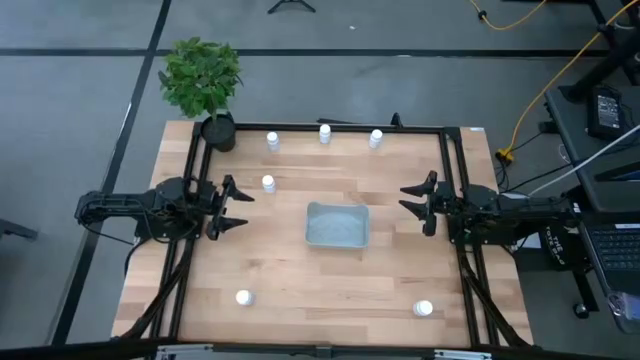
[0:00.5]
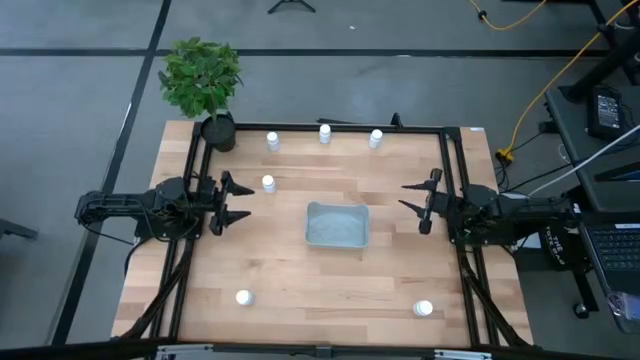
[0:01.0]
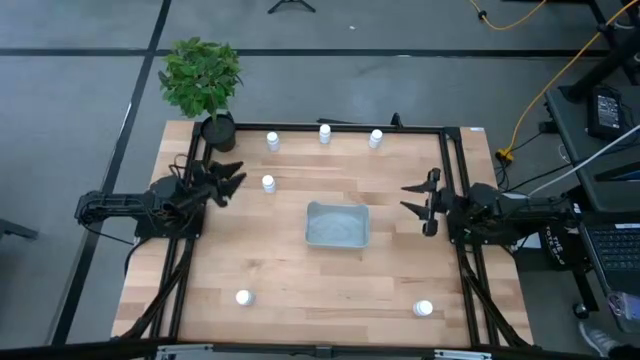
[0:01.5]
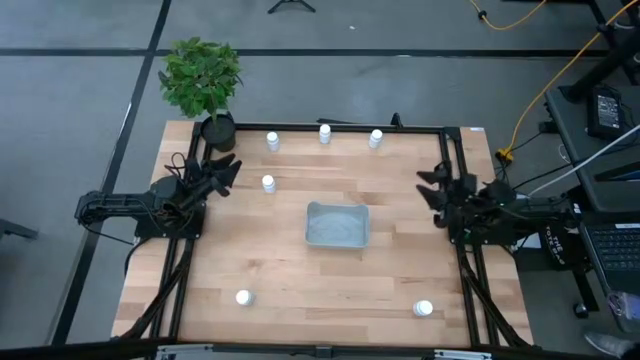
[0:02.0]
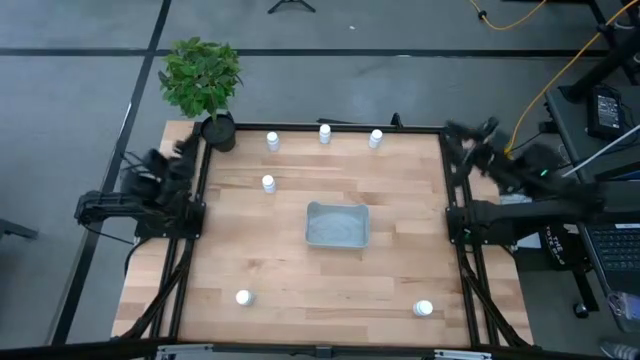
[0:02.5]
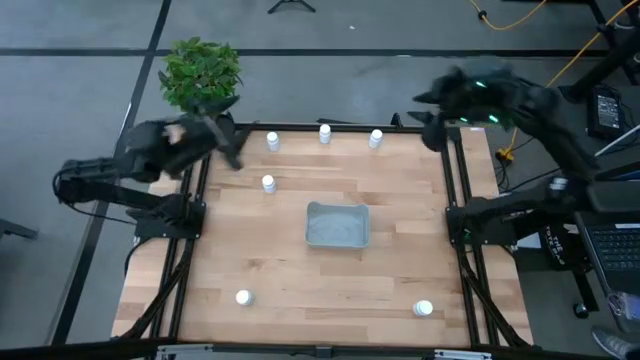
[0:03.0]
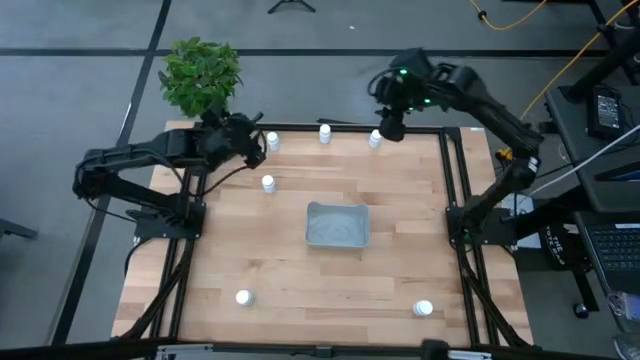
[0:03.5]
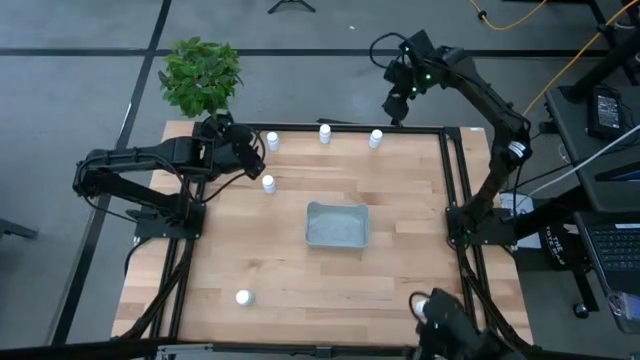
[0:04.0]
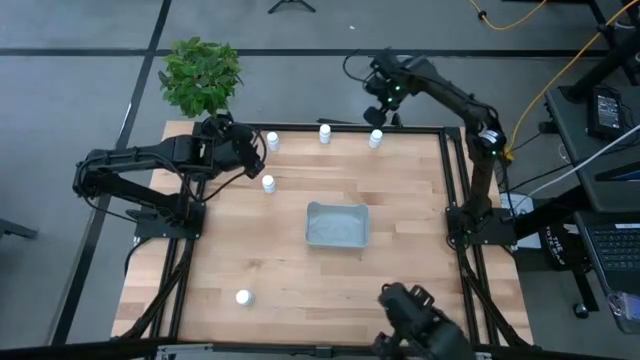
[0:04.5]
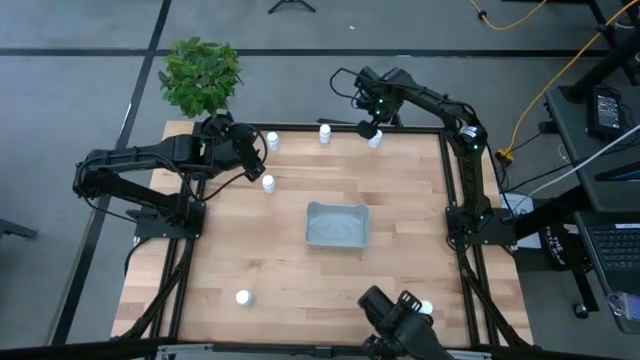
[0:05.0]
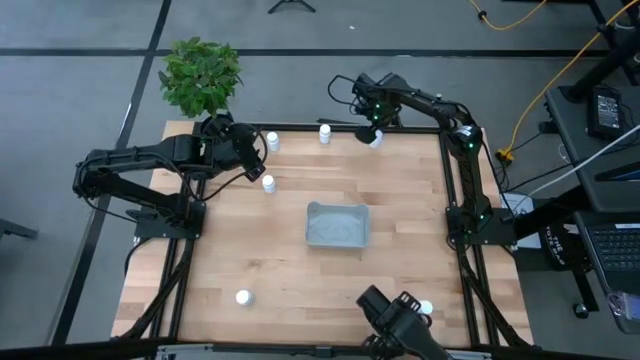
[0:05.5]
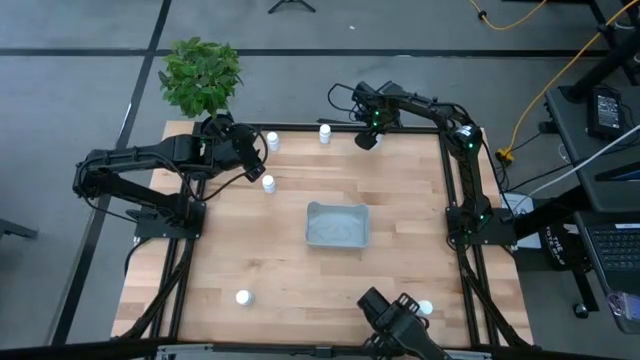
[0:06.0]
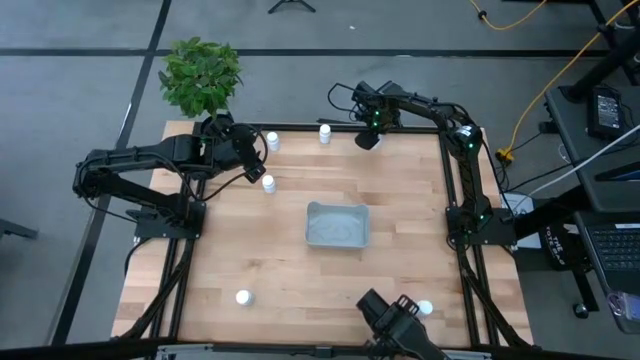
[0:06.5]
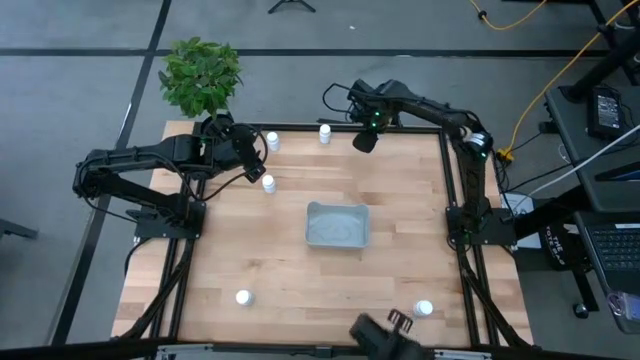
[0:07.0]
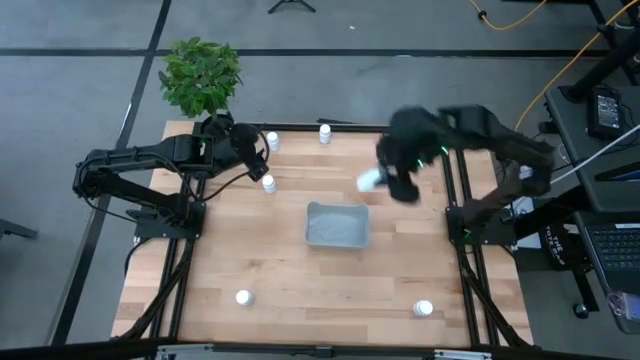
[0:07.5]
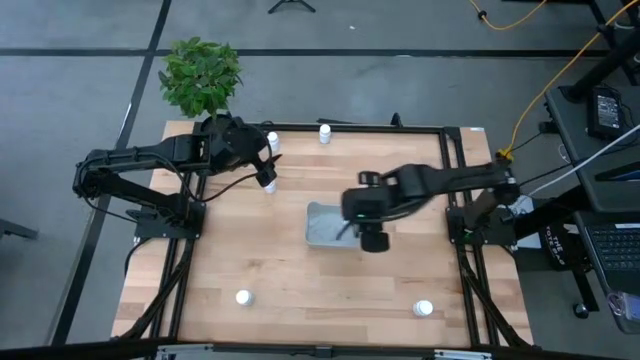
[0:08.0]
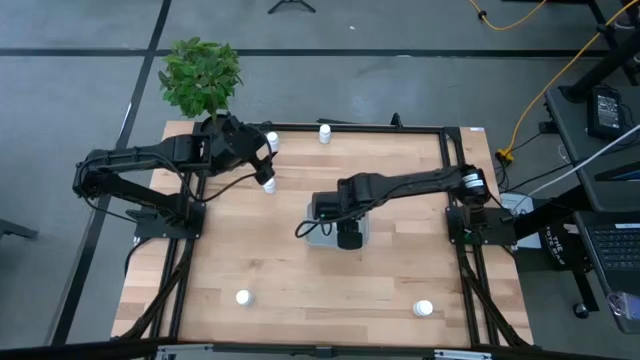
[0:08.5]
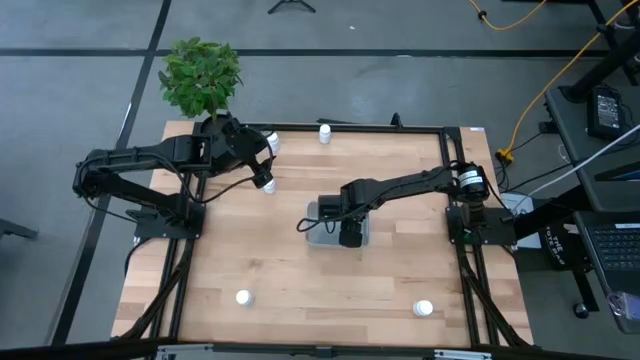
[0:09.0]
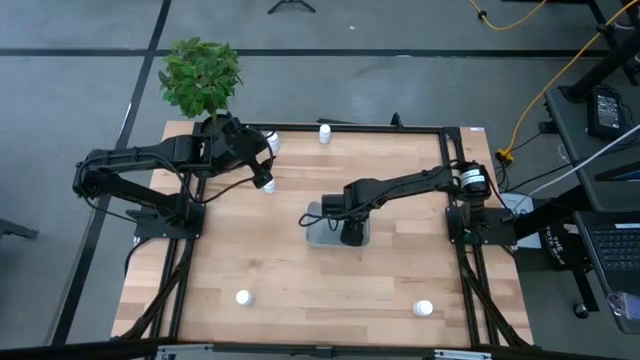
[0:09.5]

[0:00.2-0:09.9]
Task: Pick and place pill bottles into a basket
Put the white pill bottle into the gray bin

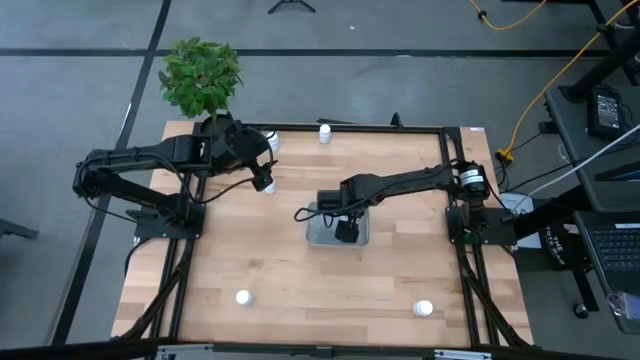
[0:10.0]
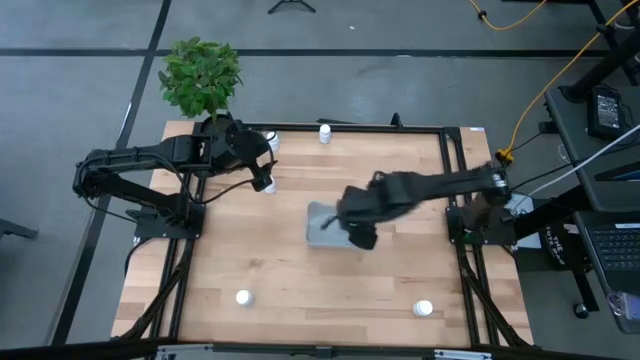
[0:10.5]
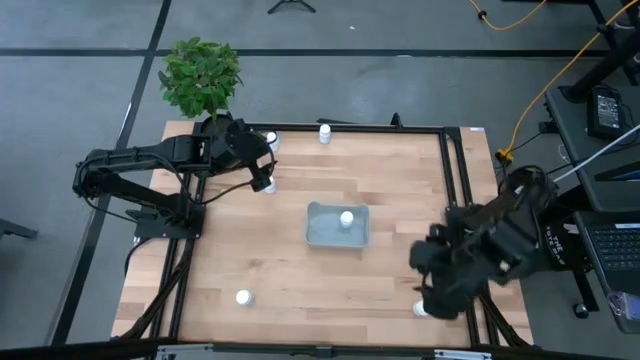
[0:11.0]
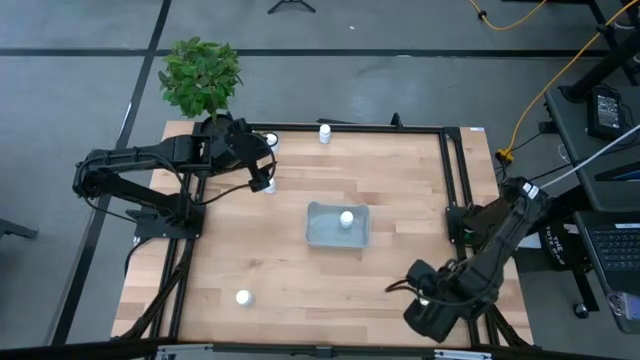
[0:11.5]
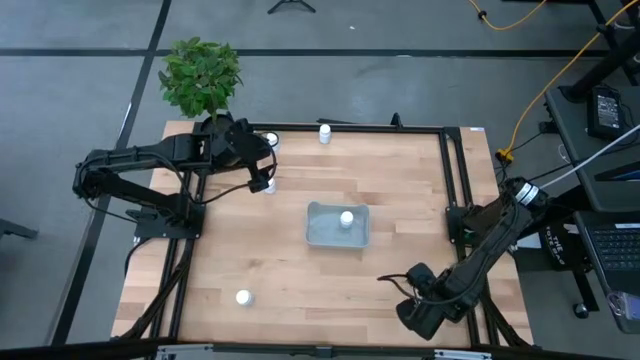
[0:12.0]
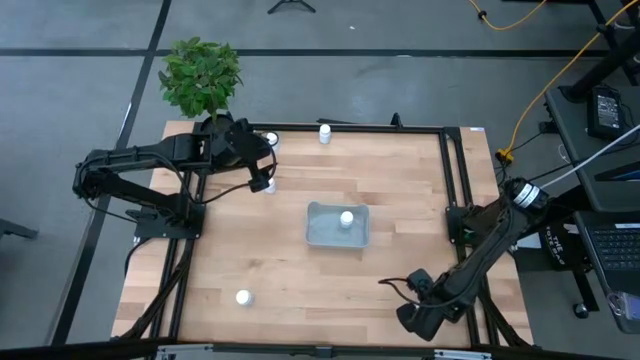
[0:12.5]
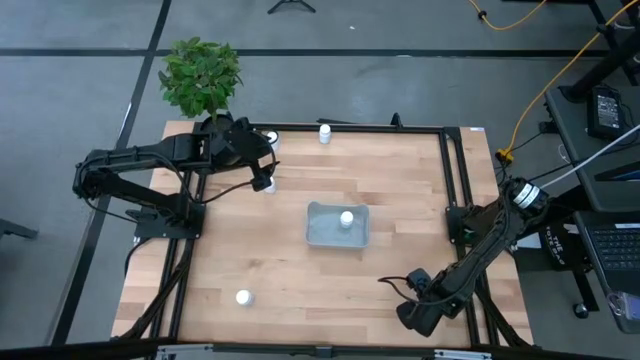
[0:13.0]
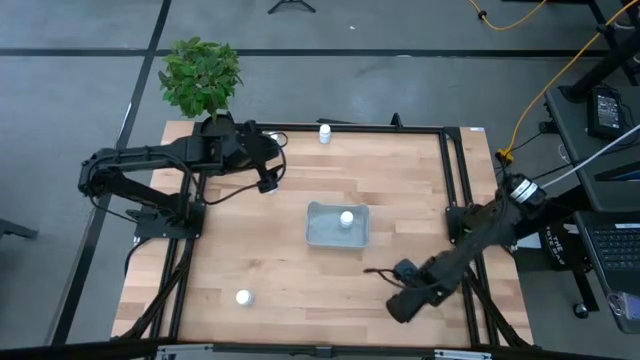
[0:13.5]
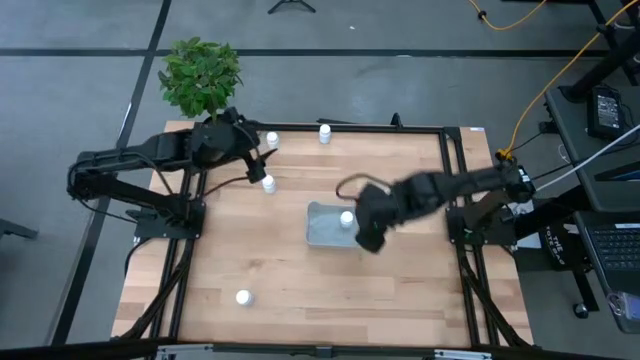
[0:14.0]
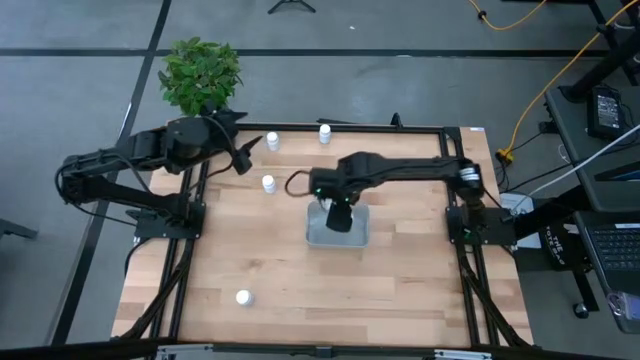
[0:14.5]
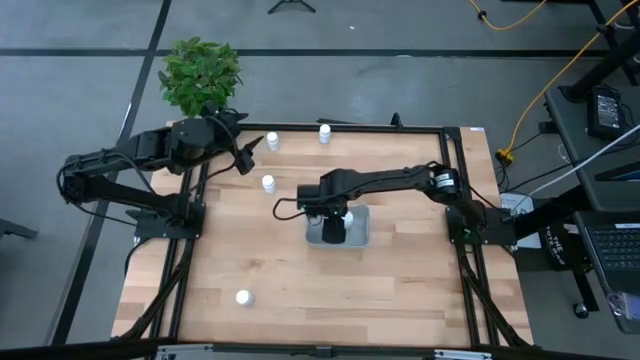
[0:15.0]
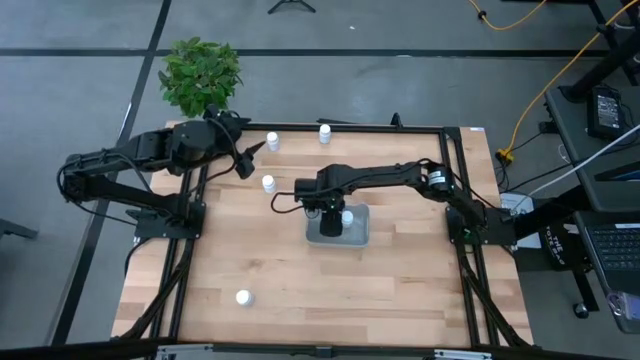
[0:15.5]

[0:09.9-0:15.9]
Put the white pill bottle into the gray bin

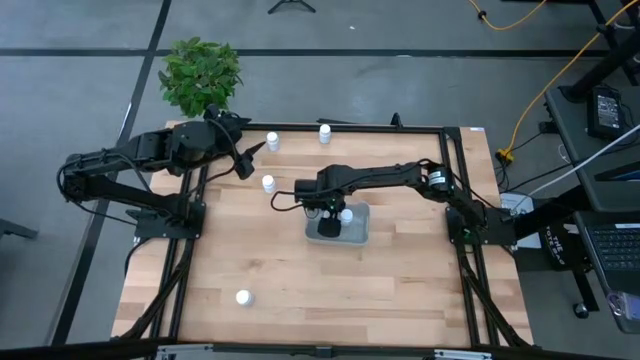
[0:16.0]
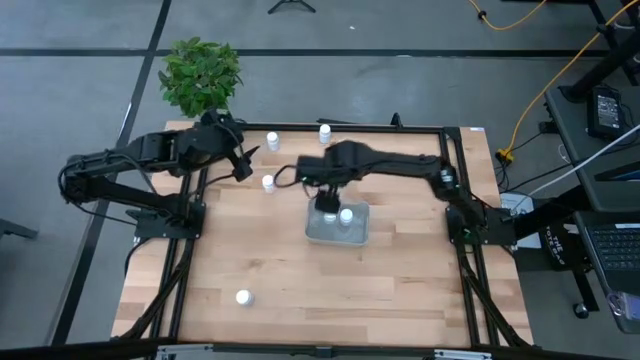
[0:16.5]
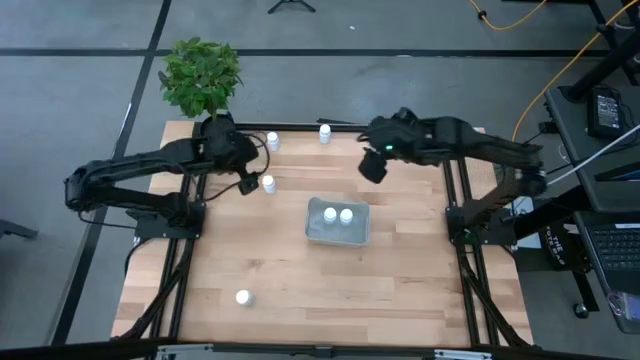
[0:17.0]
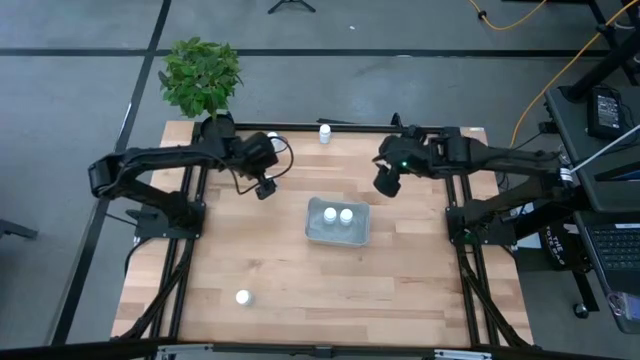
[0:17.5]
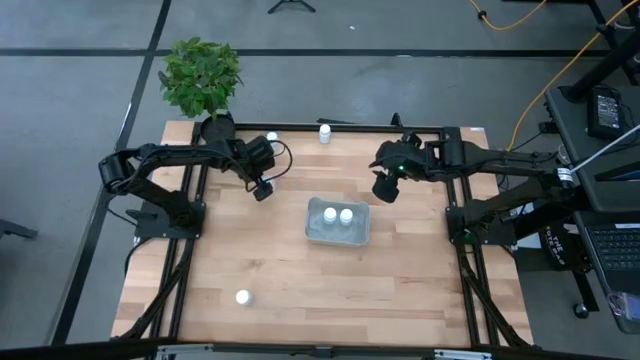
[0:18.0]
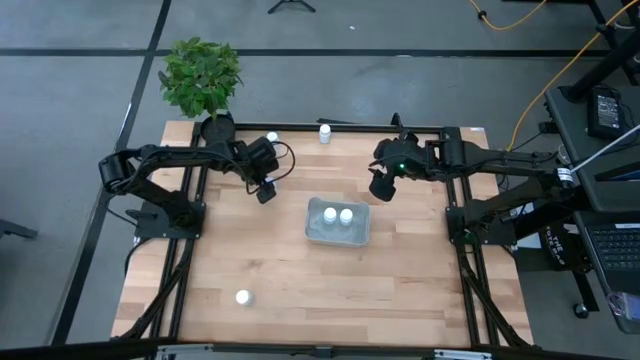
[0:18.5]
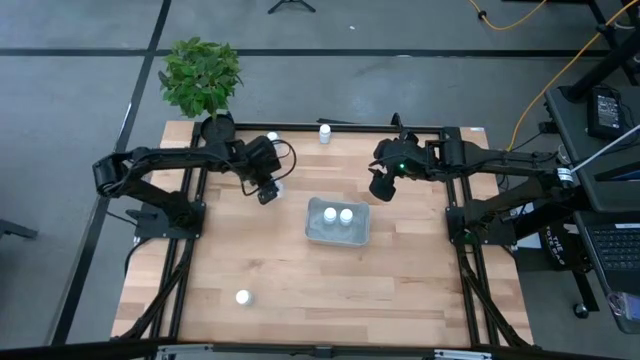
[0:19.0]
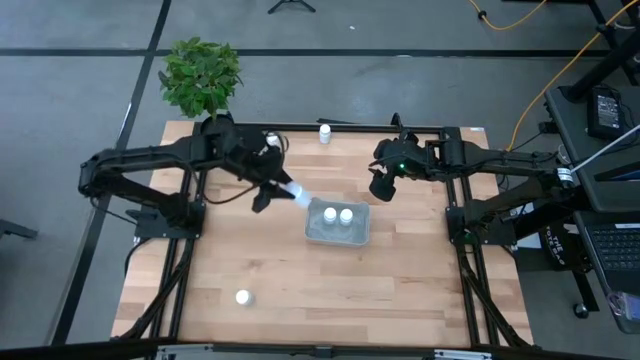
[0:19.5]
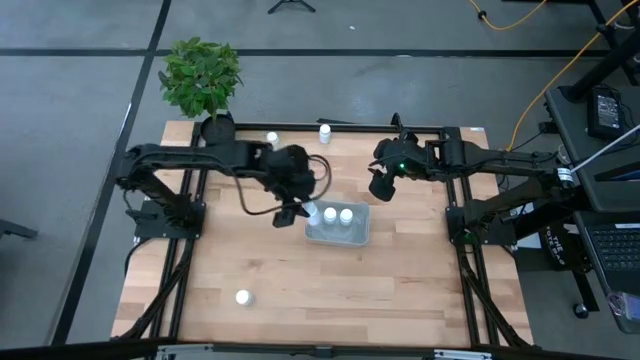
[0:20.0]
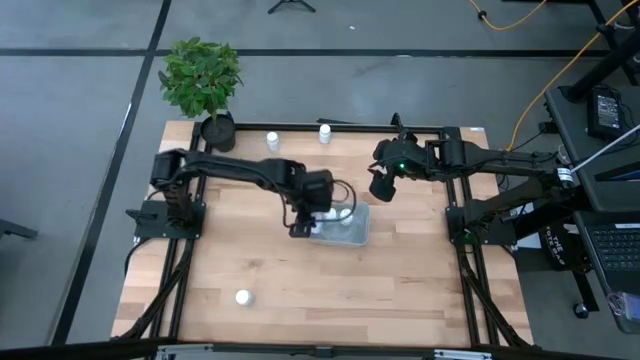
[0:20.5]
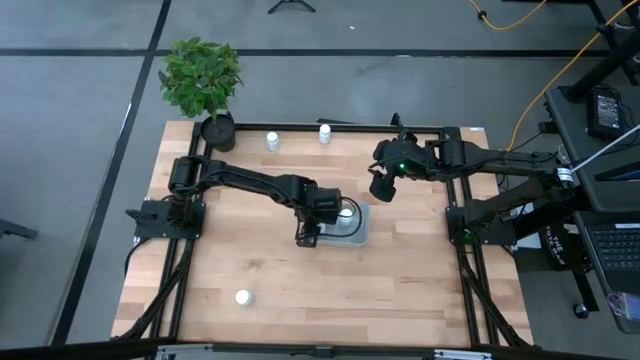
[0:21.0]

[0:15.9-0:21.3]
Put the white pill bottle into the gray bin

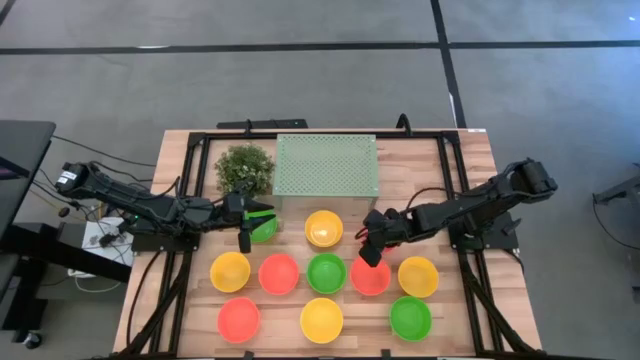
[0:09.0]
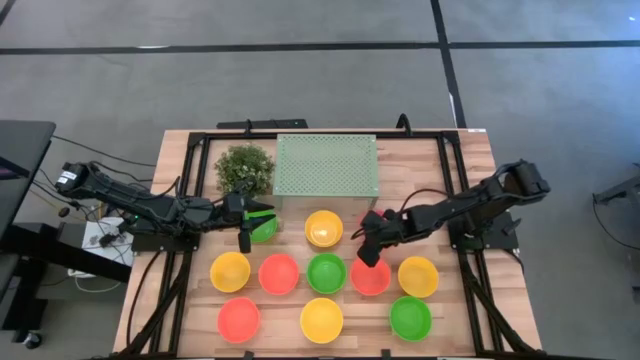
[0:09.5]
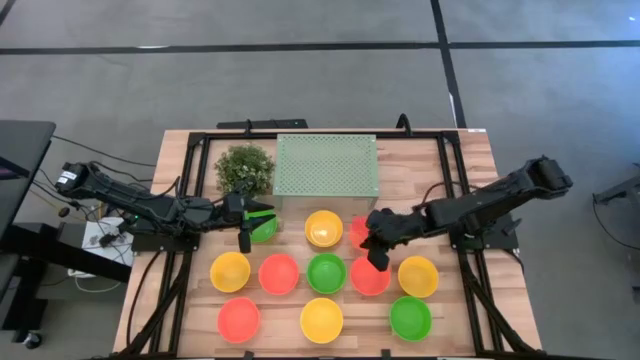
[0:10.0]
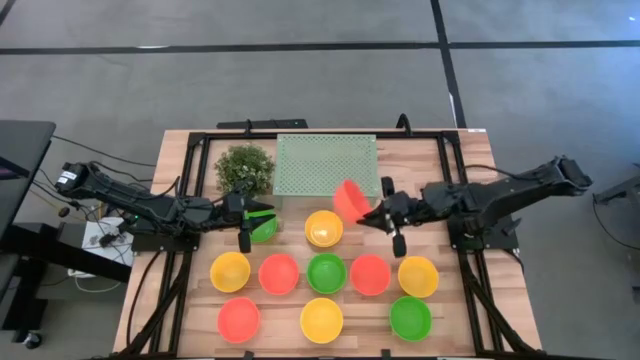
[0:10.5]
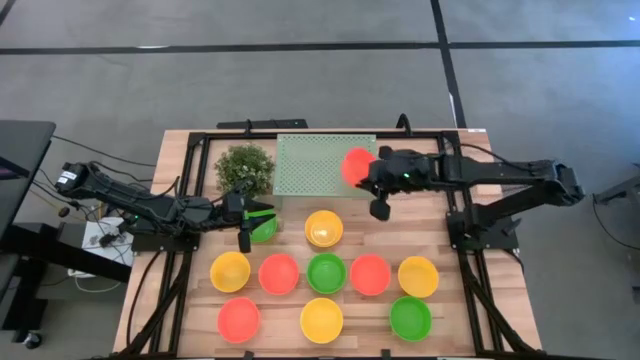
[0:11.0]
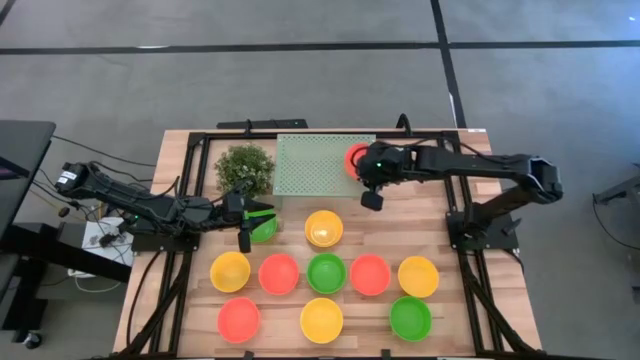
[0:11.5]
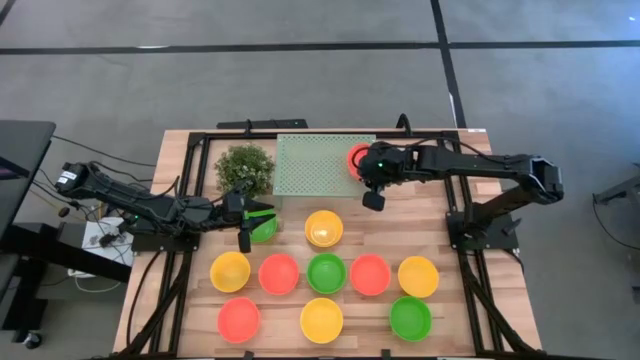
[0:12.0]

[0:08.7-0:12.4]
Task: Pick & Place Mini bowls
Put the orange bowl on the shelf
